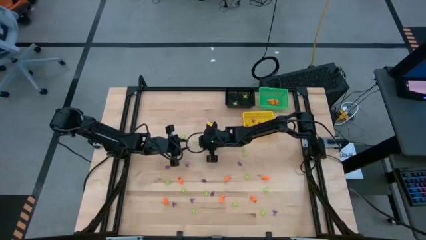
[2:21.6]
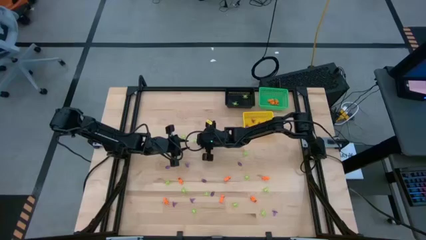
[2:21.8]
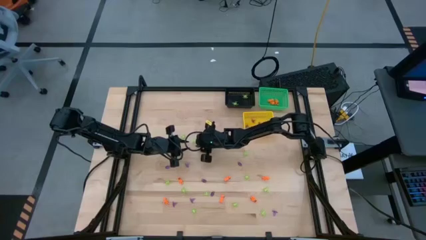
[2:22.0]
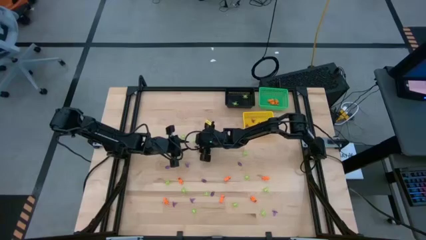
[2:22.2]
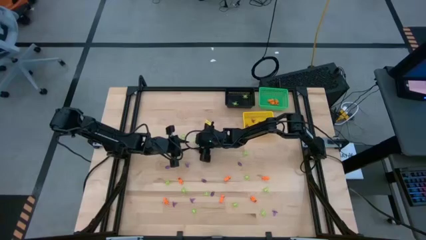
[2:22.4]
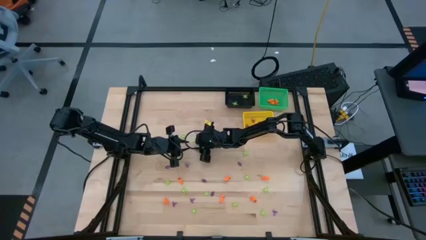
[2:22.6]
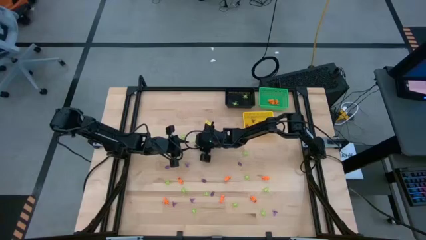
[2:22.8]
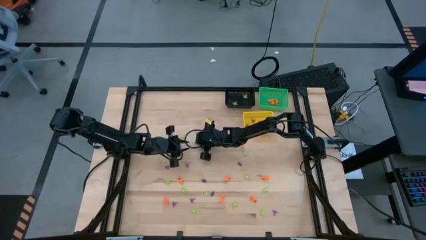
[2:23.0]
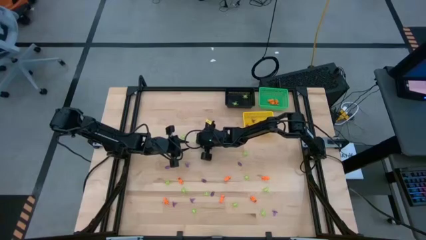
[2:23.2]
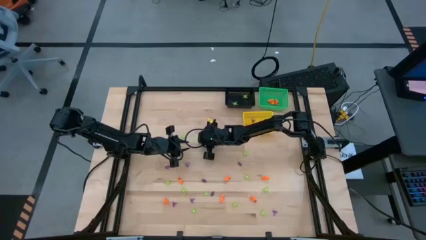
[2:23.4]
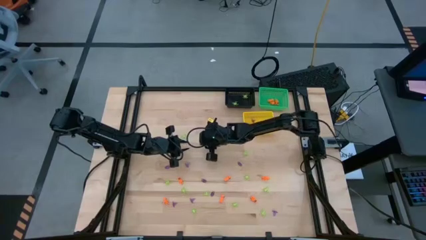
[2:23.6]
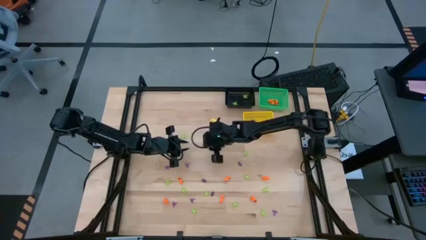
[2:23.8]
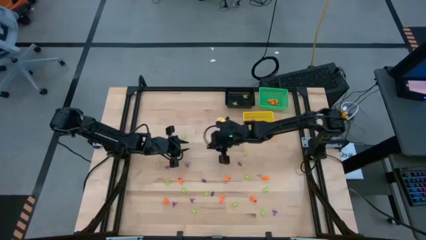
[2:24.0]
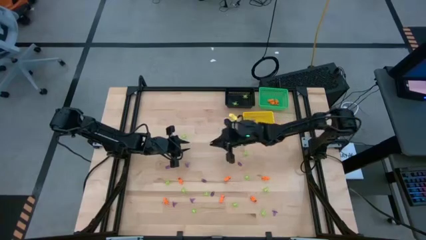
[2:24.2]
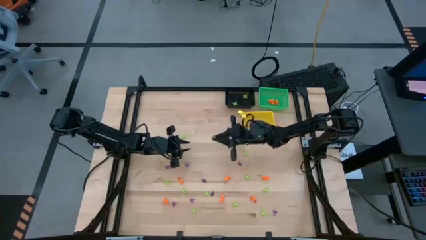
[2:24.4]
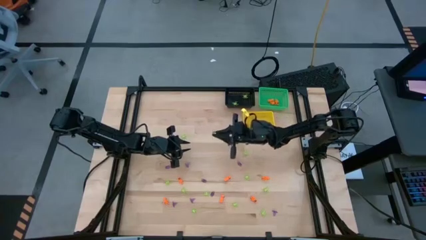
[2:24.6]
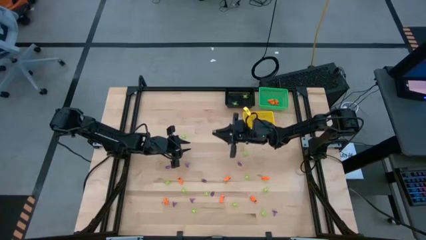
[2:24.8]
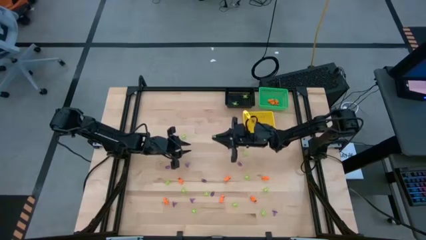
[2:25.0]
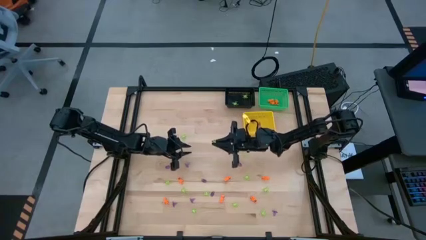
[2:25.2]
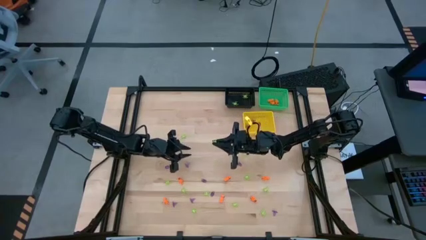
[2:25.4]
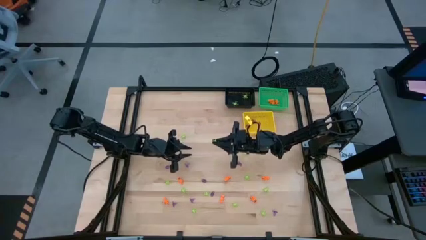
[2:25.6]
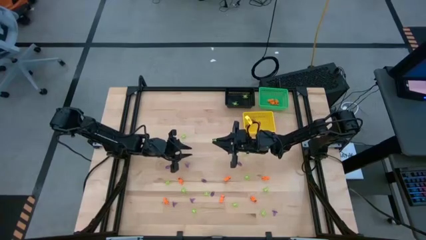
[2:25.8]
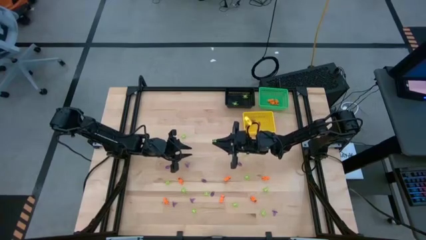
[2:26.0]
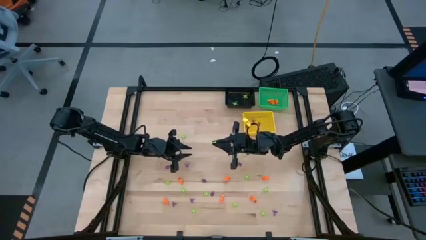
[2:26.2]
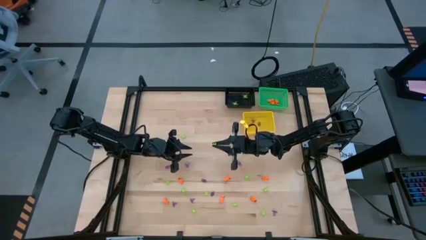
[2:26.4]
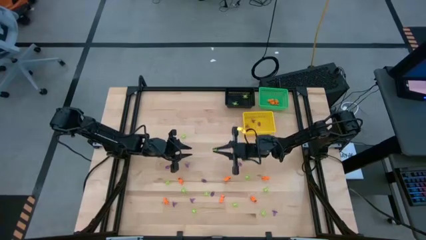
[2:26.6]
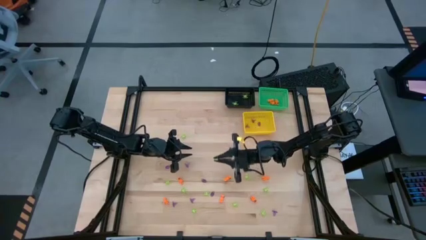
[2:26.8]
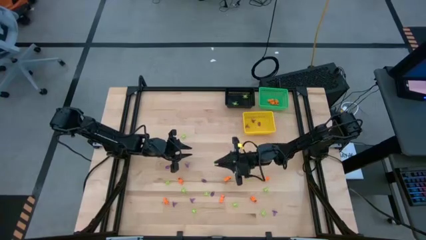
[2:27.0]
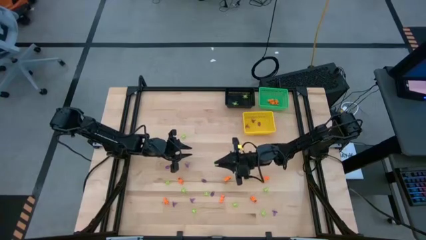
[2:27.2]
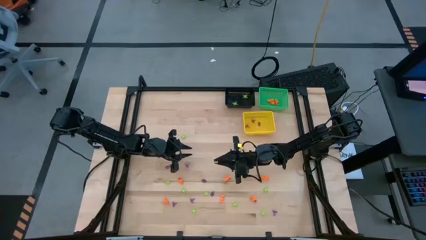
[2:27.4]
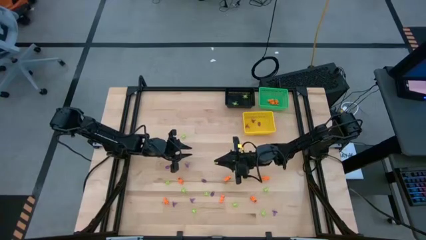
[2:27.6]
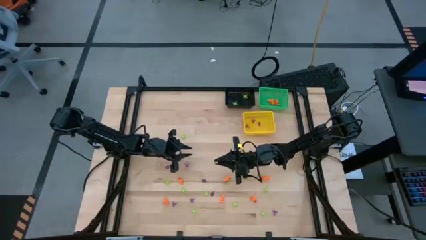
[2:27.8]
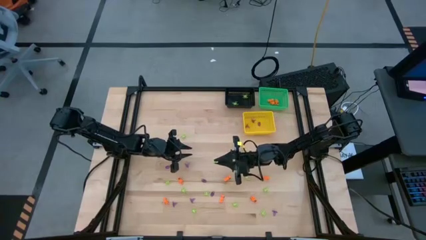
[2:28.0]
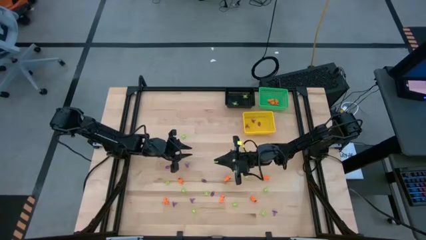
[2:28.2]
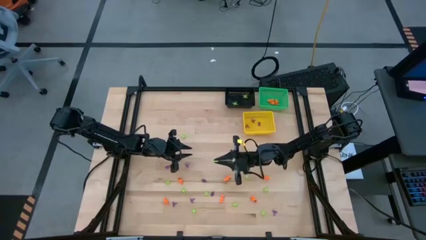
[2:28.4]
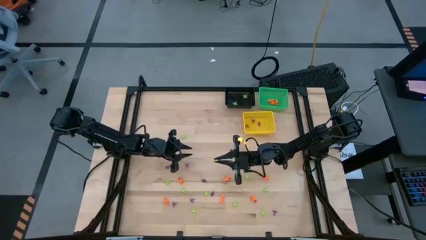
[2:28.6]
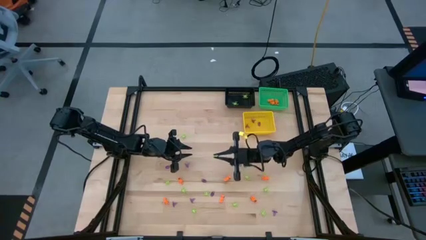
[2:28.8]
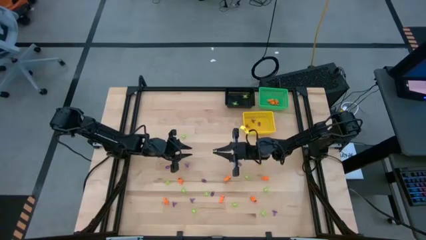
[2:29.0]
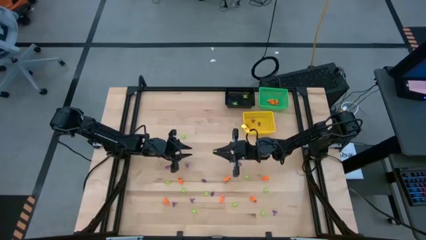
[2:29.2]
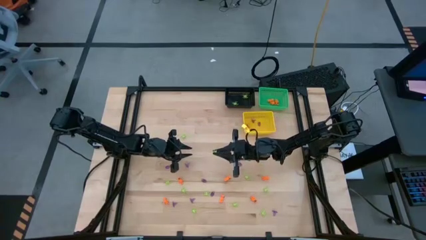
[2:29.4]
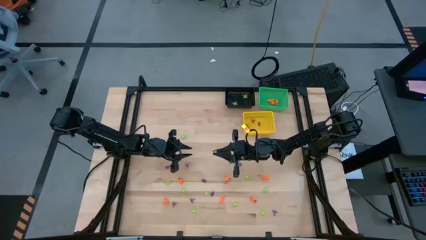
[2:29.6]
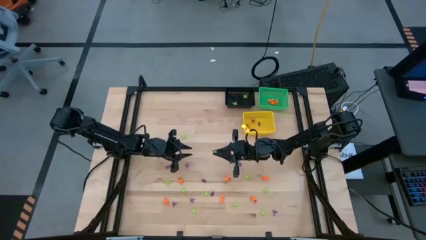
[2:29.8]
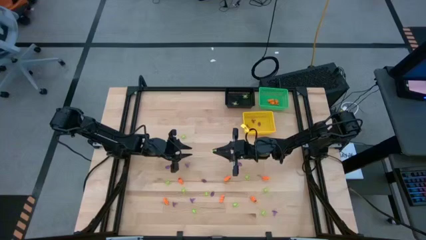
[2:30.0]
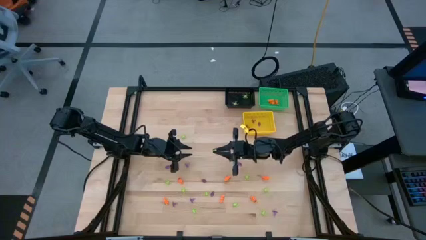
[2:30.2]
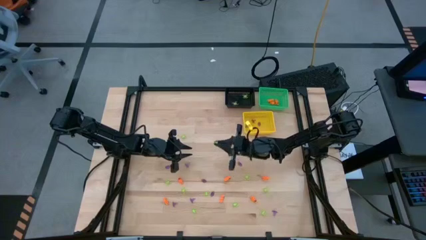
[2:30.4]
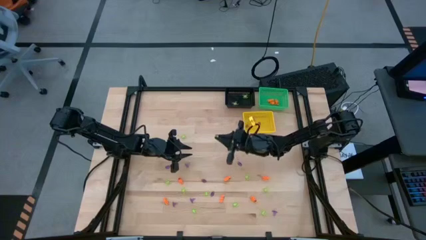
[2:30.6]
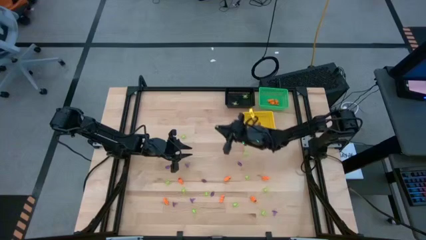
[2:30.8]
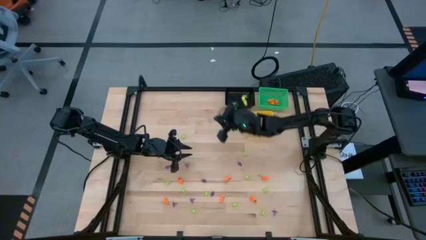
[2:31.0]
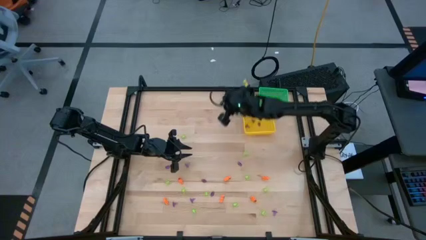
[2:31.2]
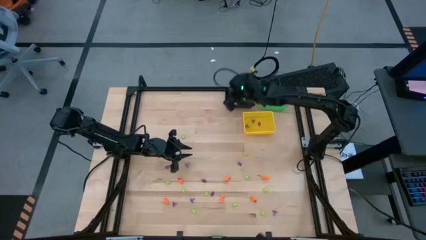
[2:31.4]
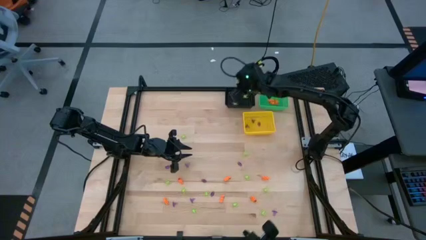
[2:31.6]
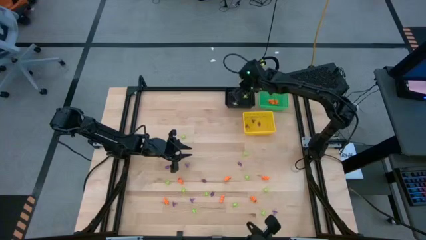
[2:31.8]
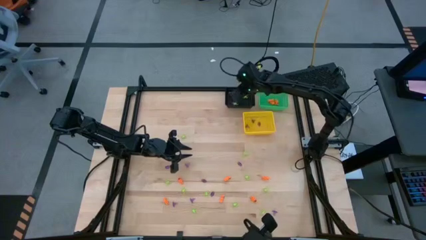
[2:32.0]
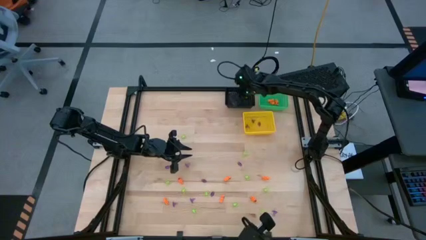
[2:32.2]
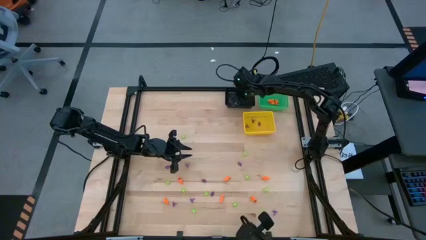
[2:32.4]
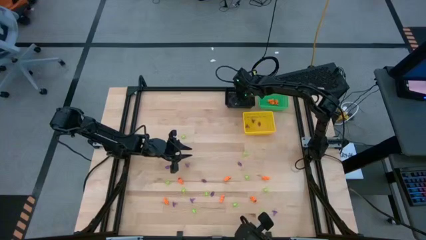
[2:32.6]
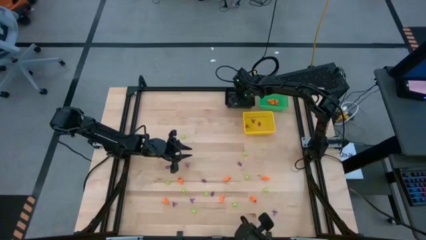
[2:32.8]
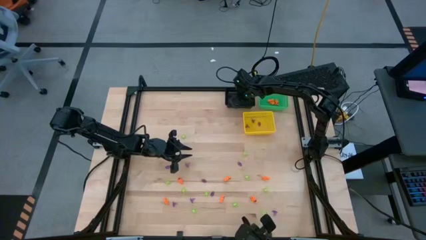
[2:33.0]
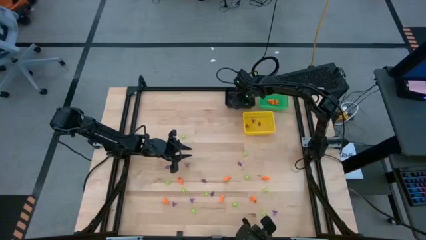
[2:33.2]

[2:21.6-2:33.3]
Task: Sort Halloween decoration
Put the green spider toy into the black basket

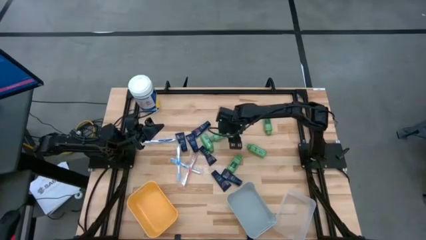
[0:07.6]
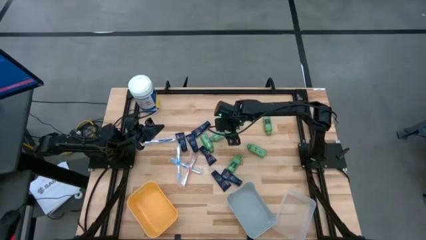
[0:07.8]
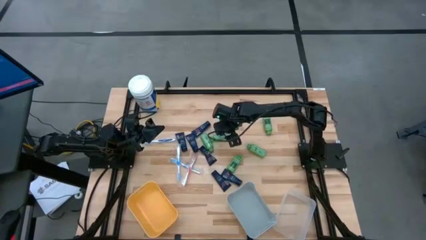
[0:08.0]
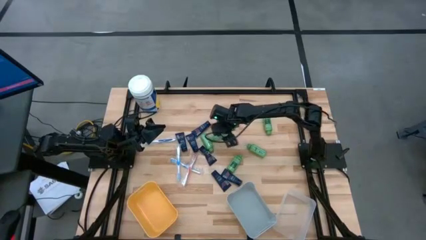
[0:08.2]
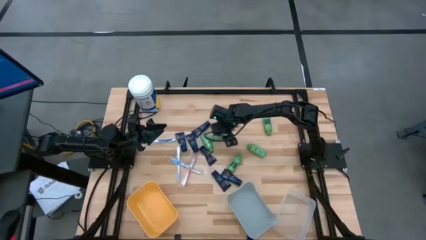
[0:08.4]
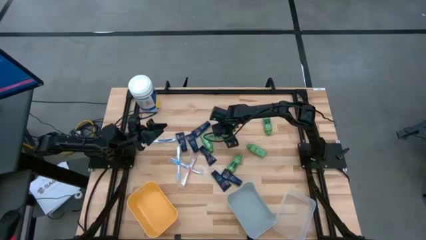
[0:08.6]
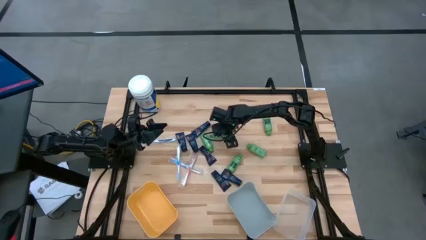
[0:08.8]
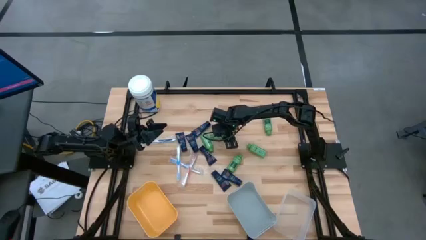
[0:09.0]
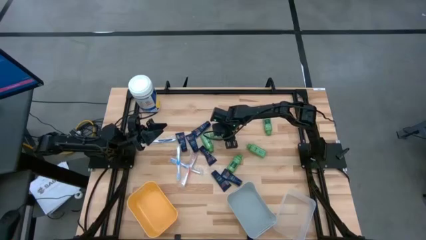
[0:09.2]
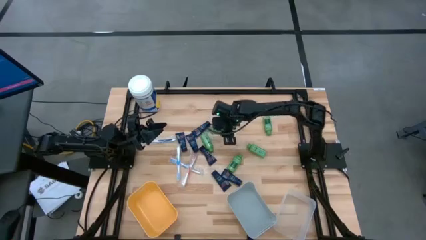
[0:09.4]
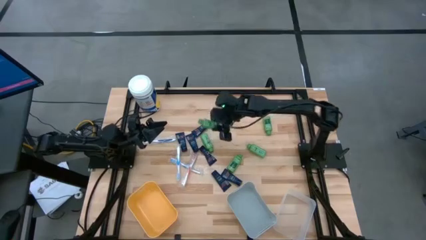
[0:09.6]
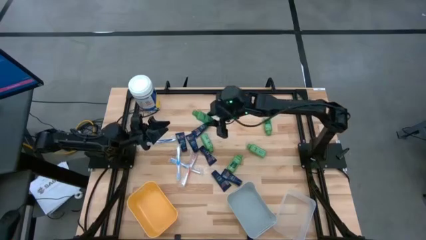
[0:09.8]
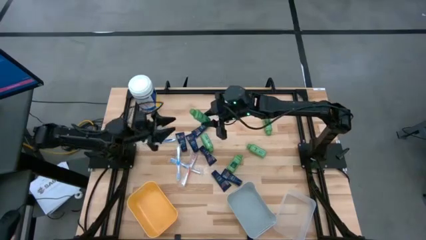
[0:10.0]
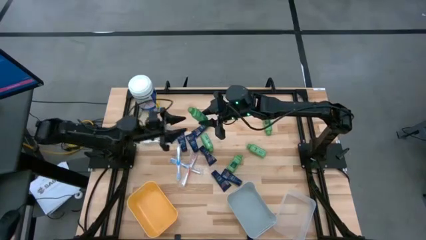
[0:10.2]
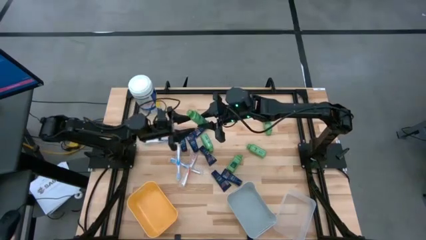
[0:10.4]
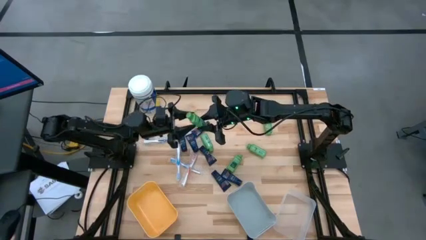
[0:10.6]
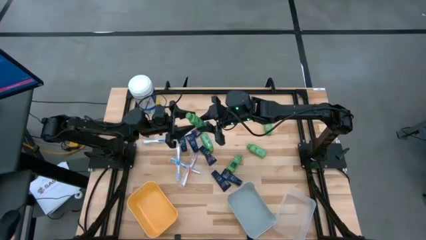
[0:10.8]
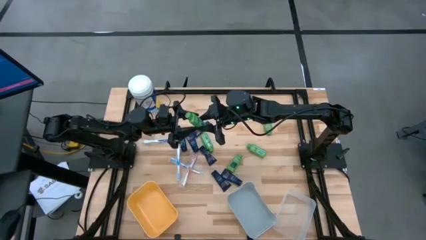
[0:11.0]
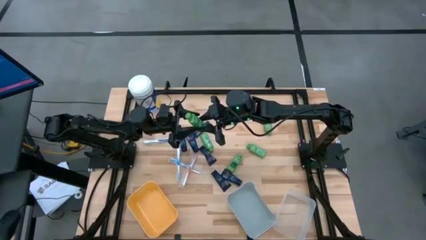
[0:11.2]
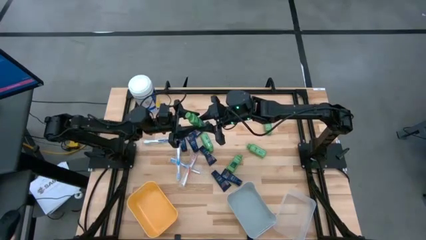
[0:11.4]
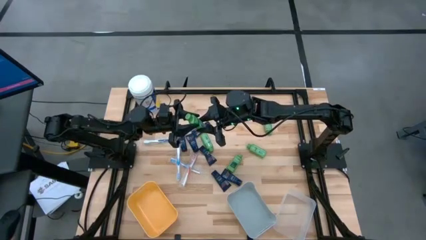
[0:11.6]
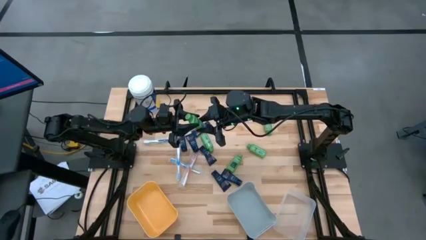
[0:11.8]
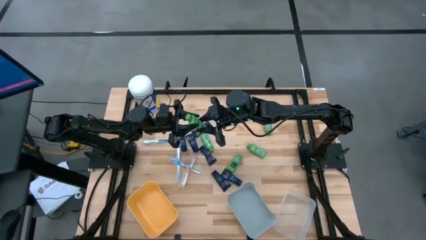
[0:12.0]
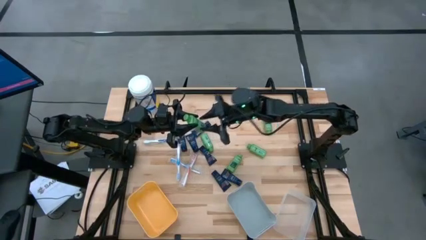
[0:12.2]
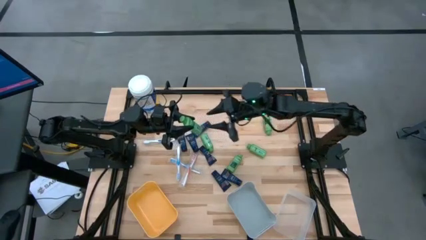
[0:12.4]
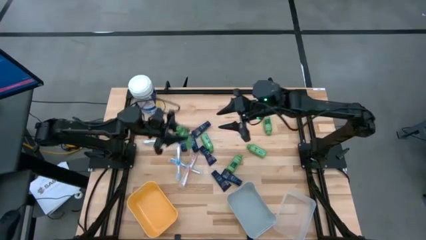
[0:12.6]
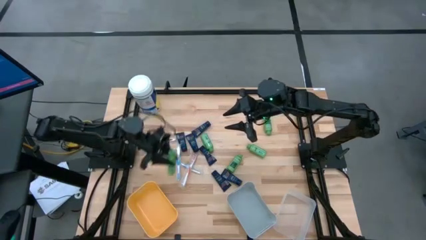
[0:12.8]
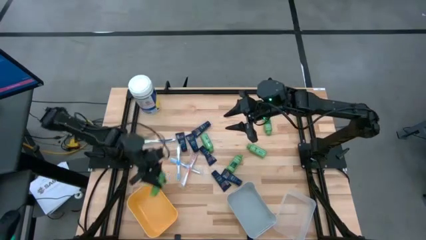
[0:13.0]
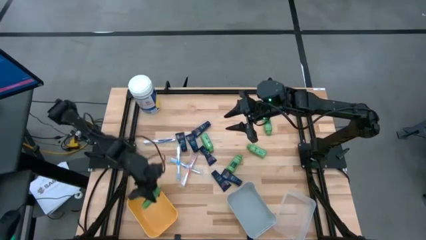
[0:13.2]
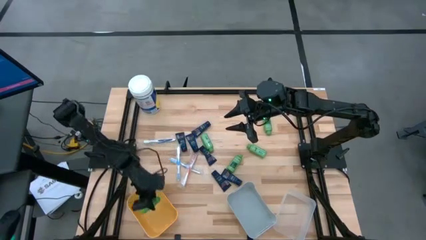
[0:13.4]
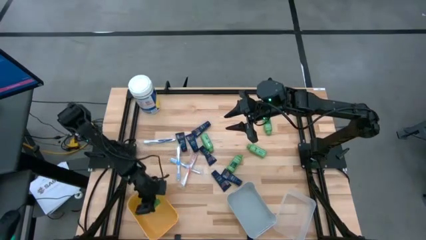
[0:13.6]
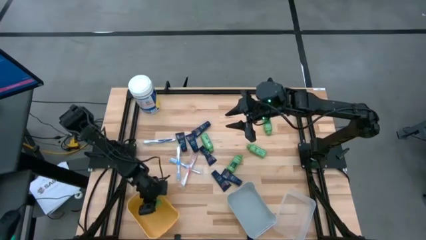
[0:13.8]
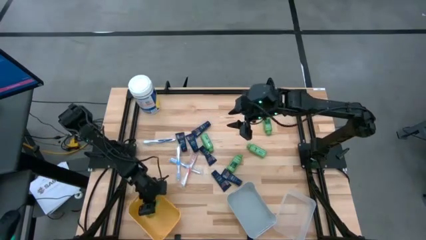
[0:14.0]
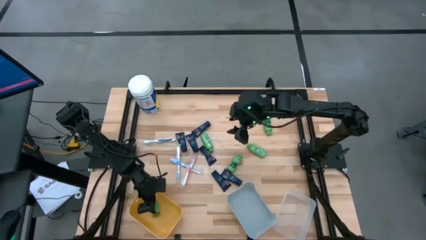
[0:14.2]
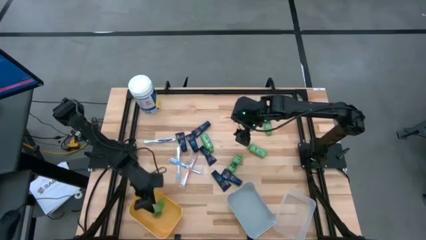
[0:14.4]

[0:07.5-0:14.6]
Task: Pick & Place Travel size toiletries
Put the green shampoo into the yellow bin
